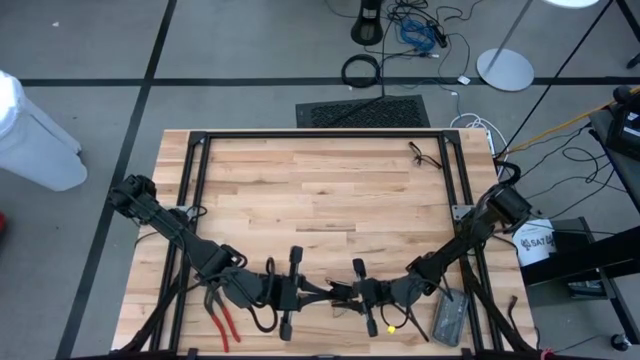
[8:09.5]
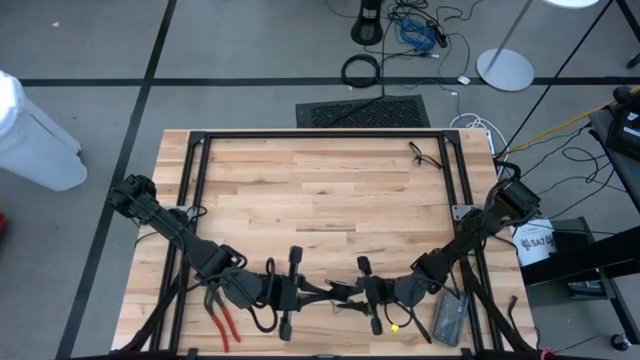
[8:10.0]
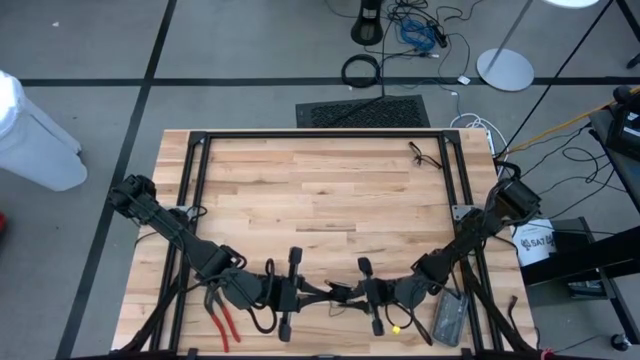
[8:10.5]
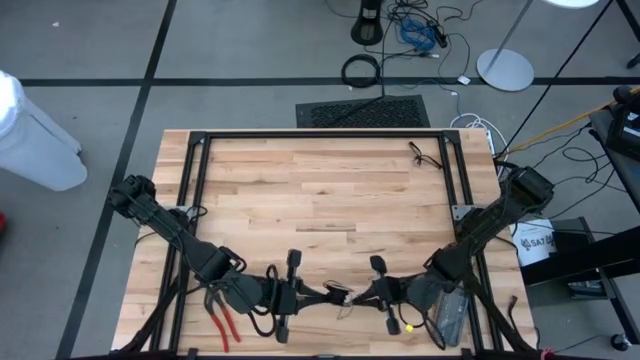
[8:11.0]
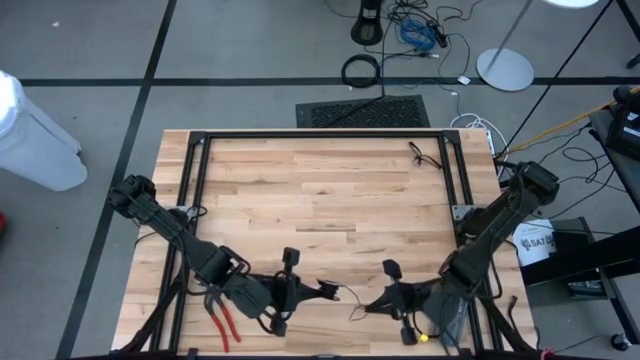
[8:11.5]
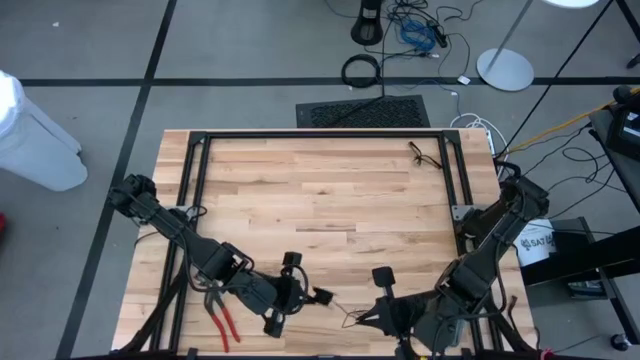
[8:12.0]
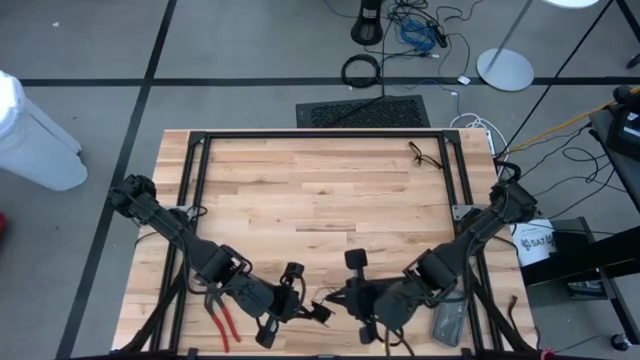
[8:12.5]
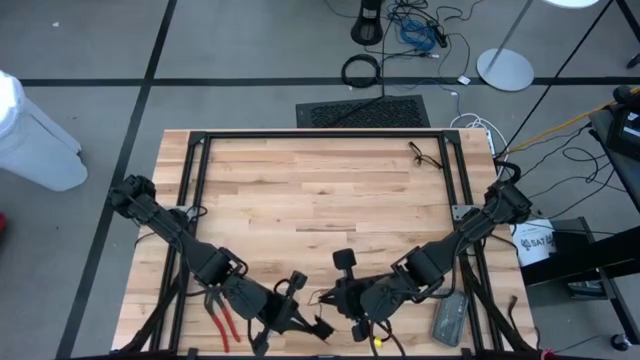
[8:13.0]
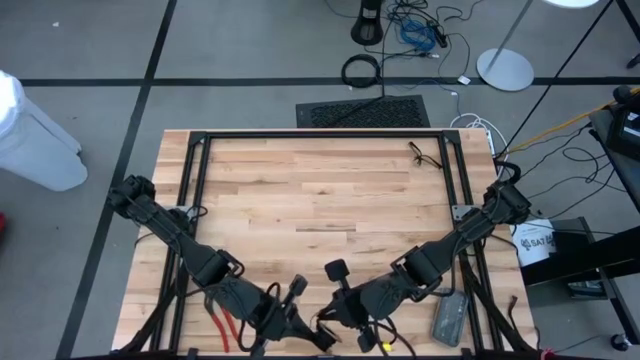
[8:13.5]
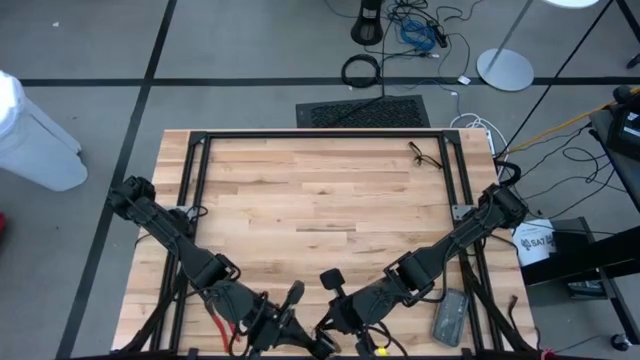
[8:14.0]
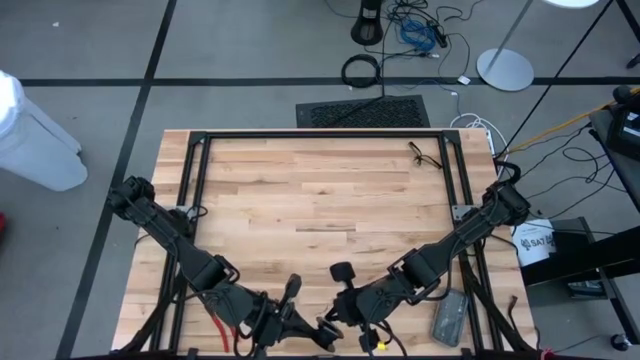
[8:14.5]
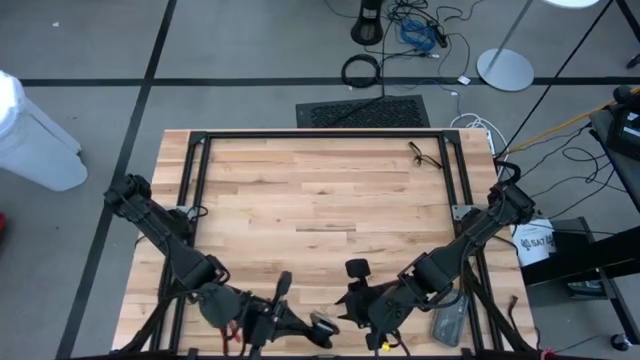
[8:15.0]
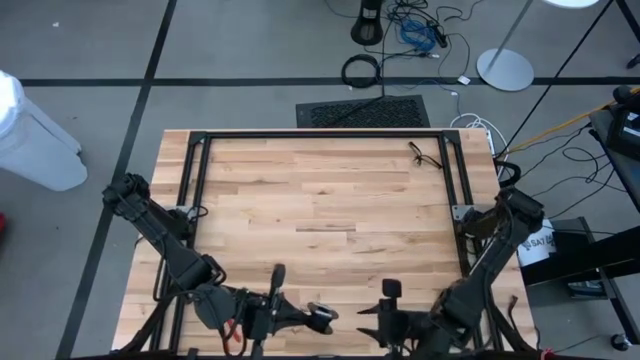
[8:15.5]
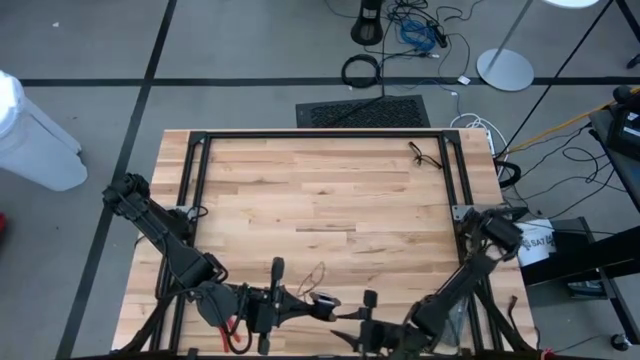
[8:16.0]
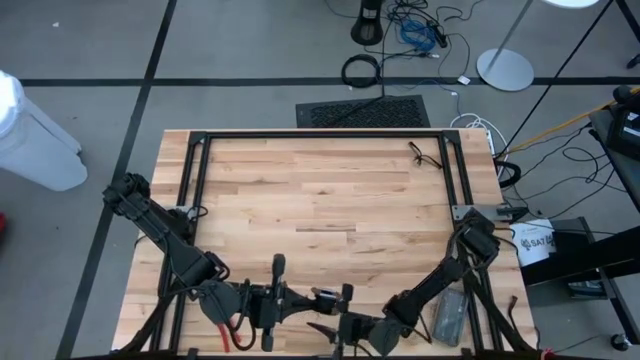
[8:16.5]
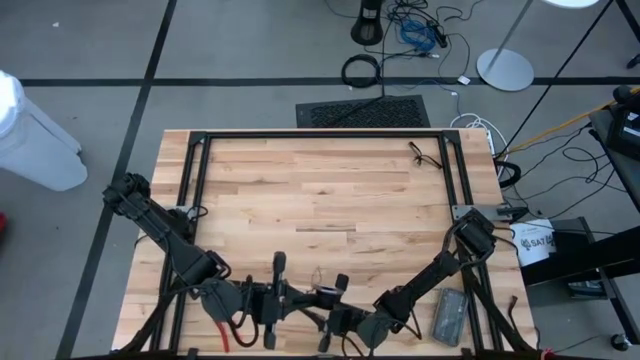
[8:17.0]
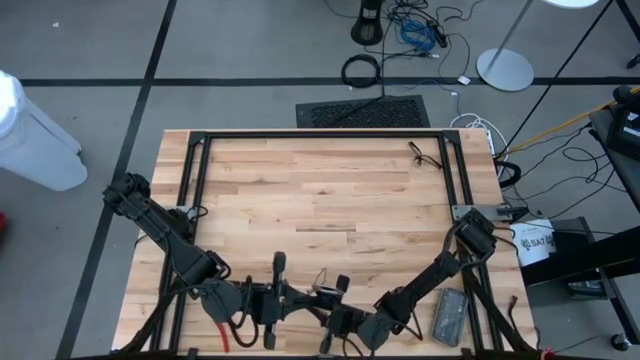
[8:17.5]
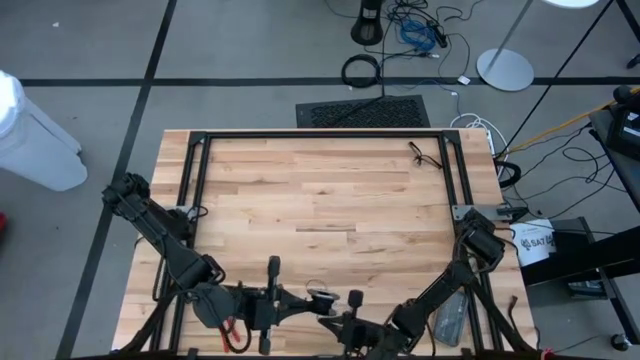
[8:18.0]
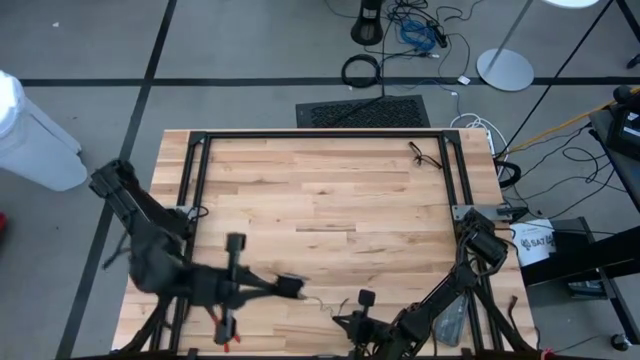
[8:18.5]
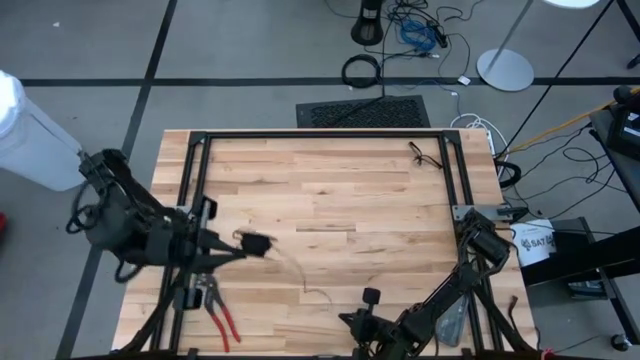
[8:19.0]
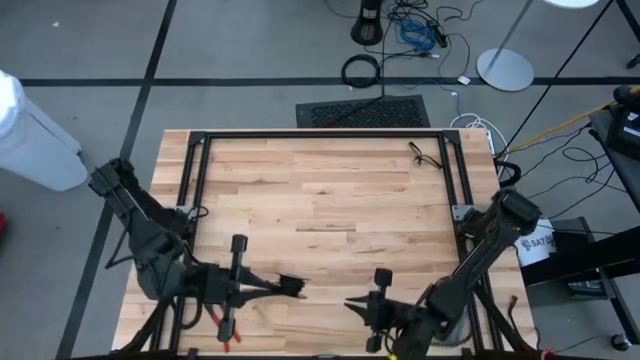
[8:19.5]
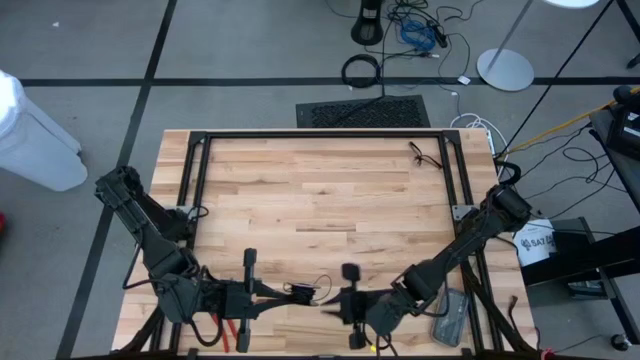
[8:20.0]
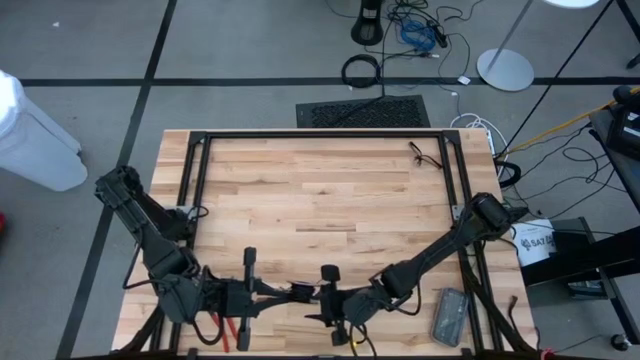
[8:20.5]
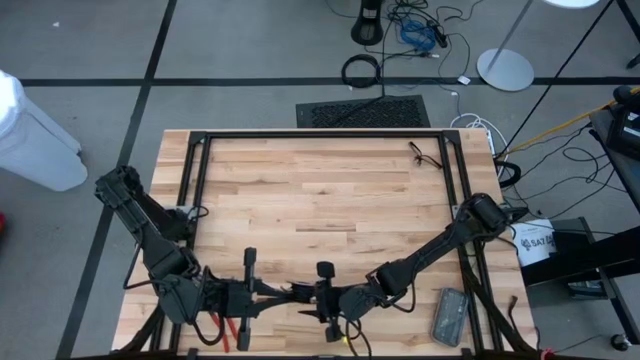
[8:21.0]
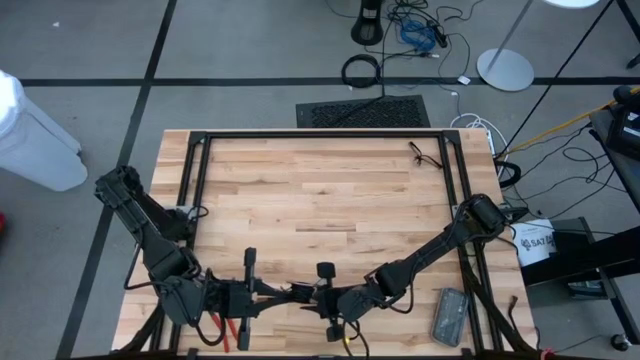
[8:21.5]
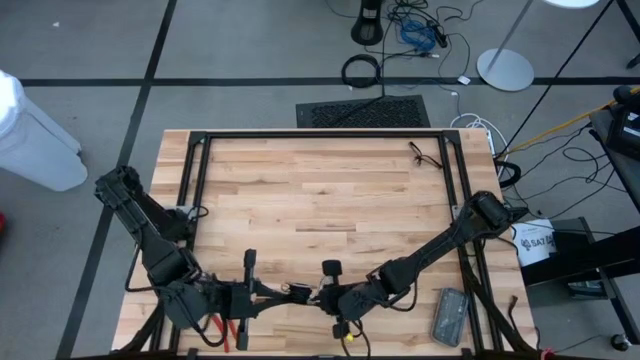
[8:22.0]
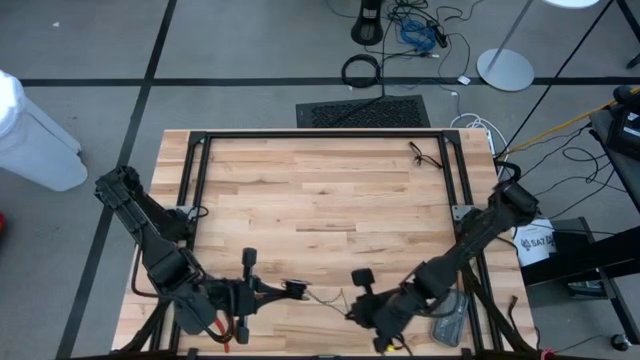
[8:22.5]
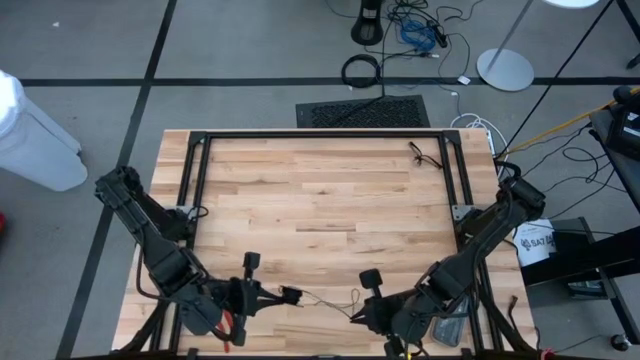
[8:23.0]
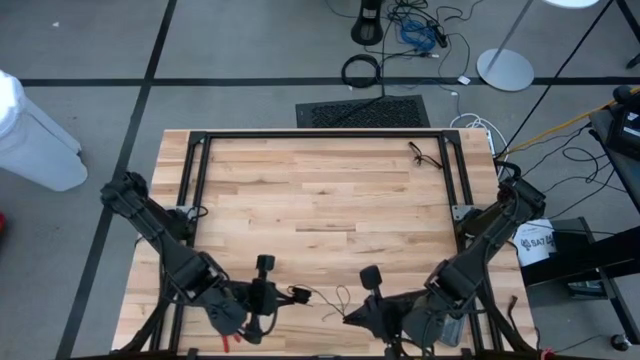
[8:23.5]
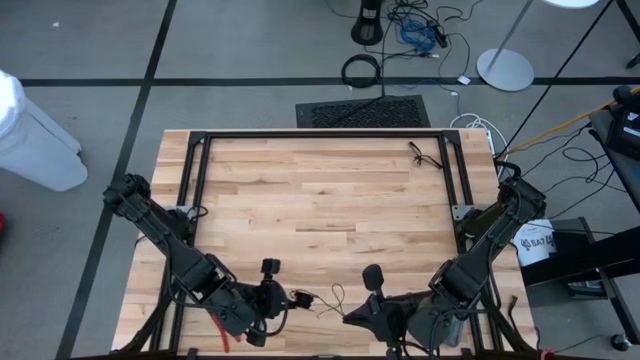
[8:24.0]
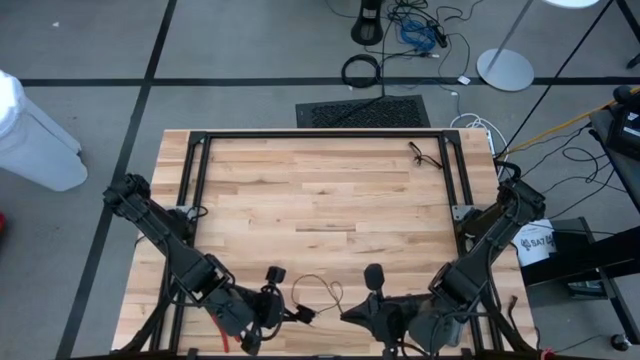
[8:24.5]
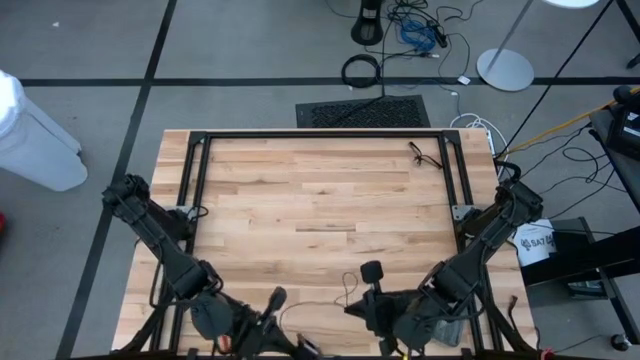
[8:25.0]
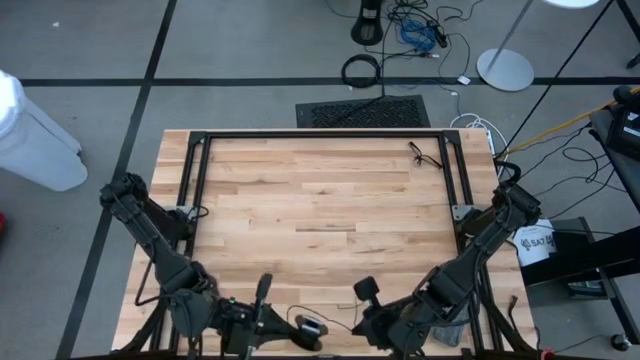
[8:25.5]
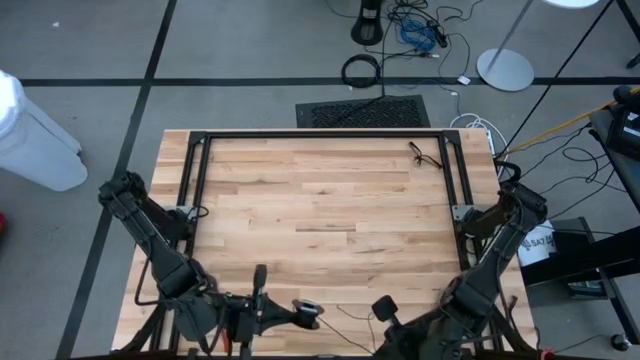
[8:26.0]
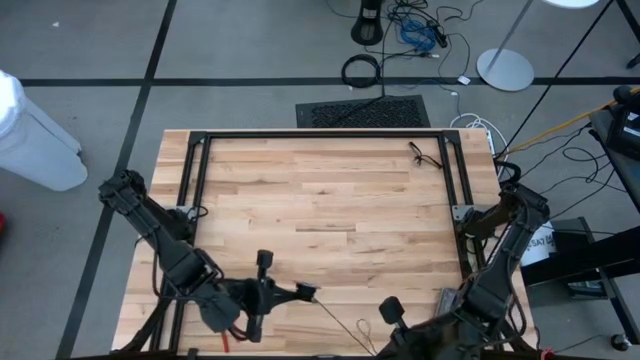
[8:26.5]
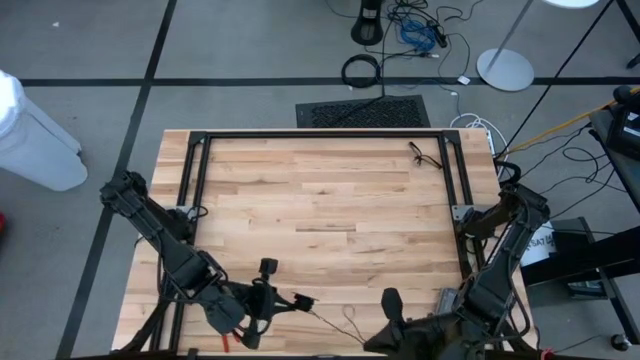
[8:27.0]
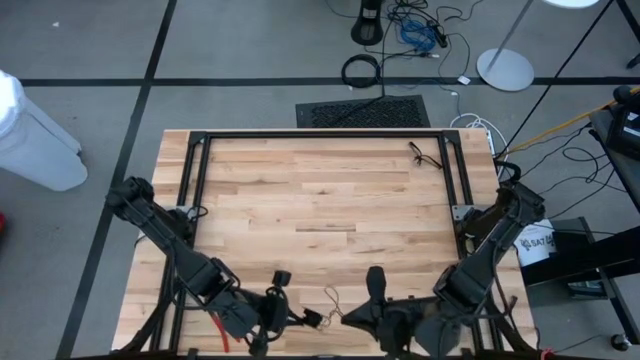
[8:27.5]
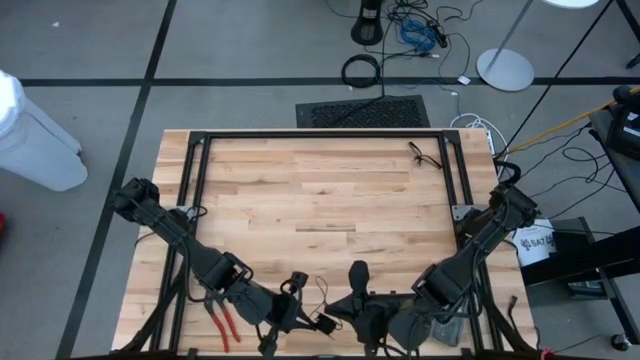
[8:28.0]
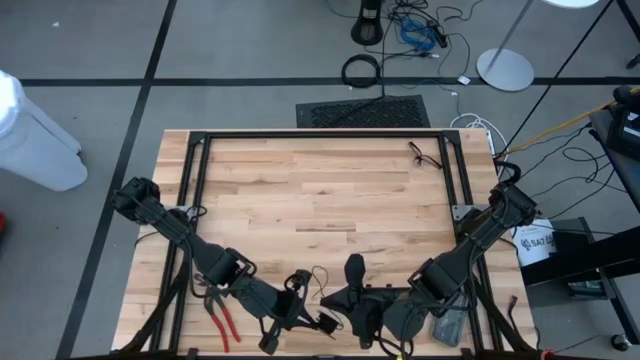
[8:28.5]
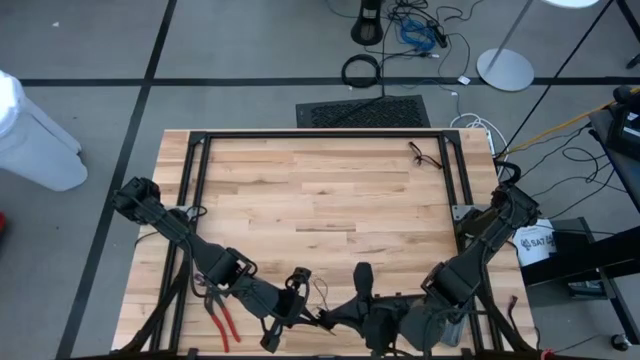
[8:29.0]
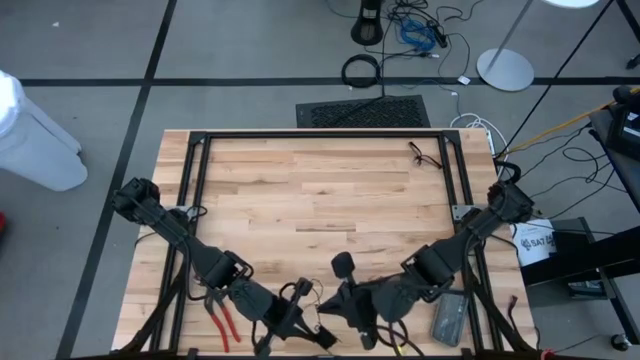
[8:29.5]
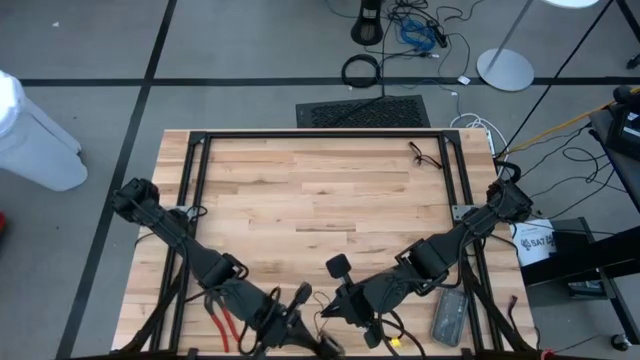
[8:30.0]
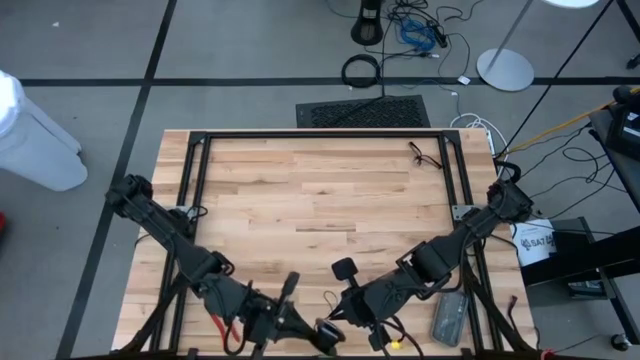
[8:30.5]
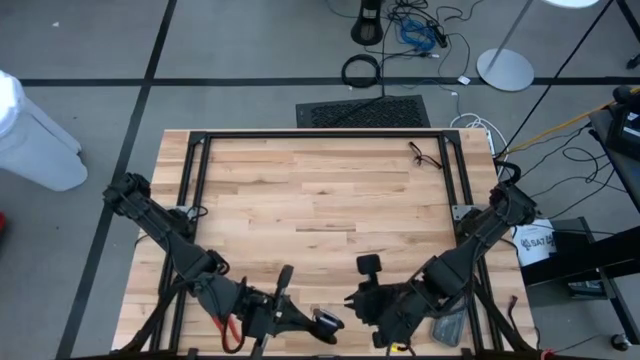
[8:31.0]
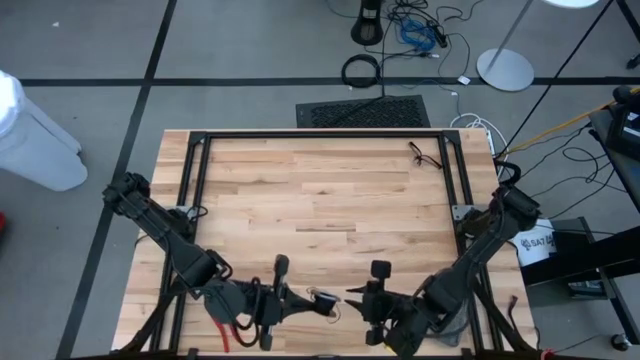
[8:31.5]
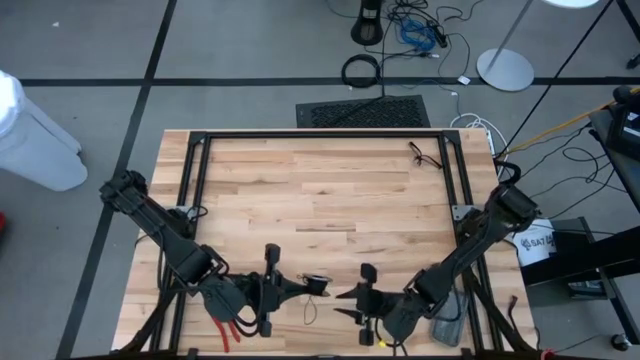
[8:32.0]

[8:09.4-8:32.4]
Task: Coil cords
Coil the black wire onto the black spool
